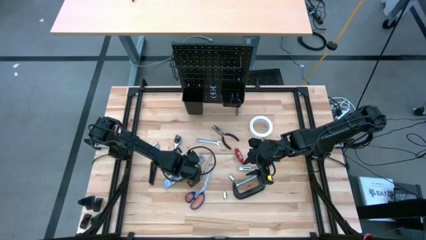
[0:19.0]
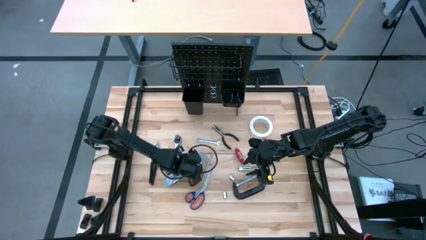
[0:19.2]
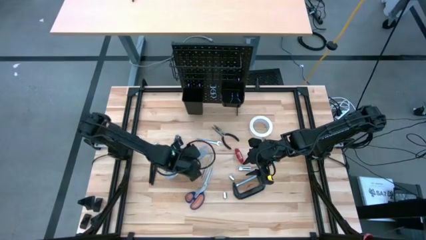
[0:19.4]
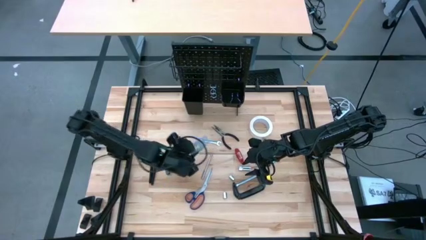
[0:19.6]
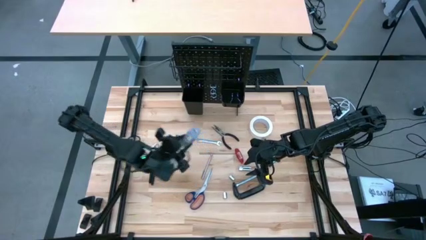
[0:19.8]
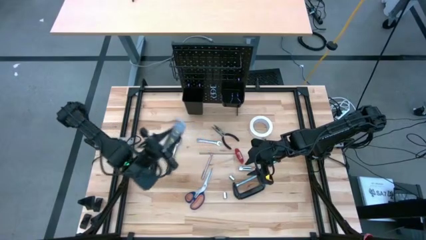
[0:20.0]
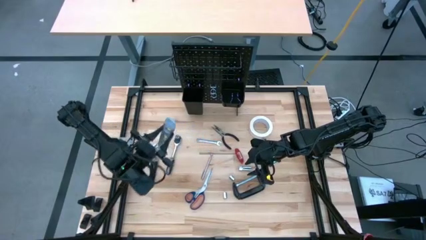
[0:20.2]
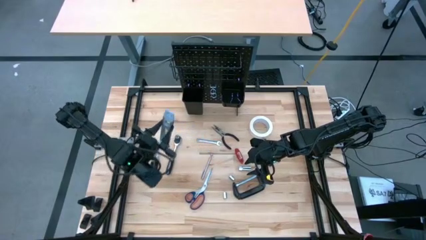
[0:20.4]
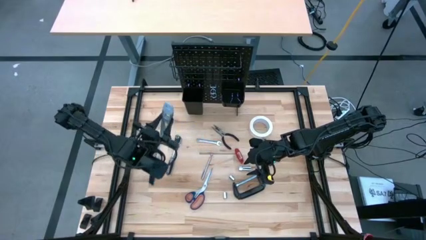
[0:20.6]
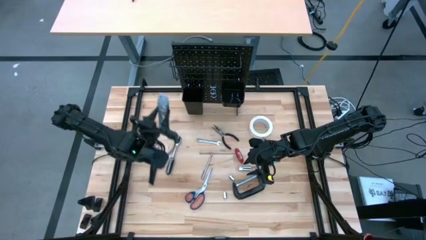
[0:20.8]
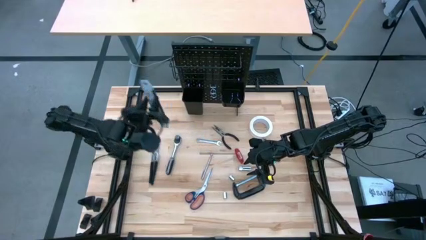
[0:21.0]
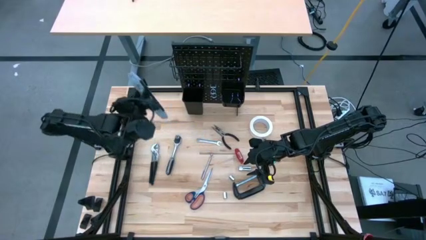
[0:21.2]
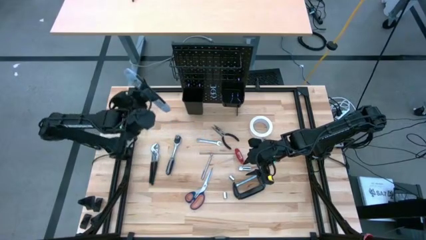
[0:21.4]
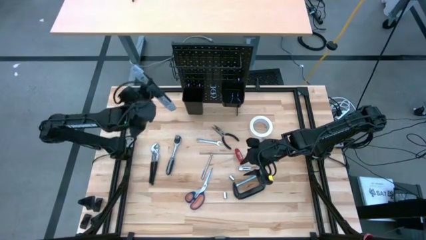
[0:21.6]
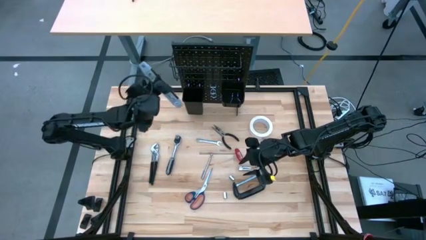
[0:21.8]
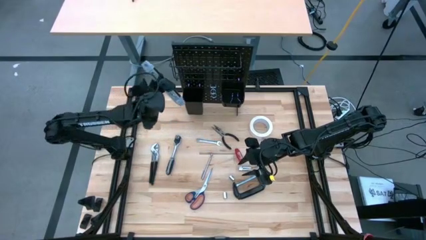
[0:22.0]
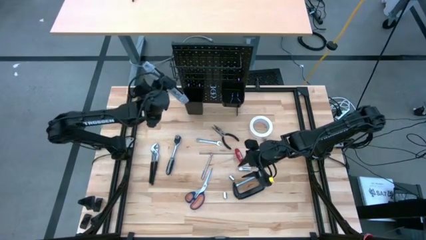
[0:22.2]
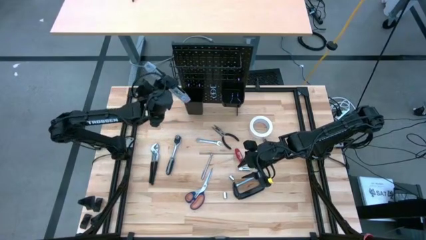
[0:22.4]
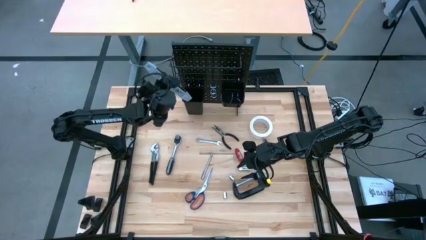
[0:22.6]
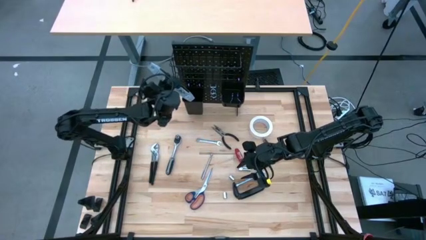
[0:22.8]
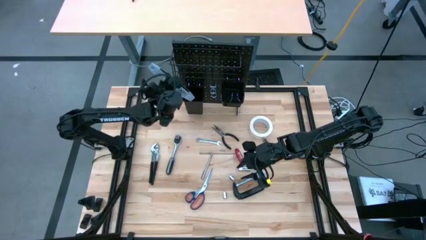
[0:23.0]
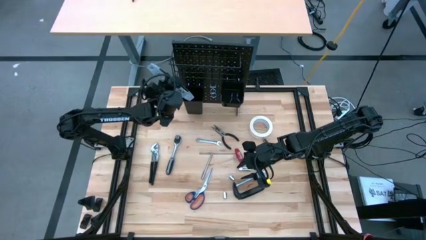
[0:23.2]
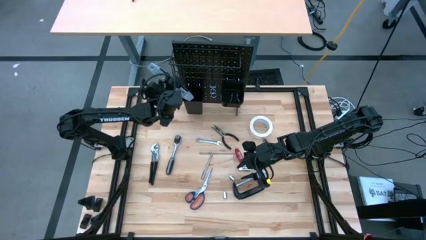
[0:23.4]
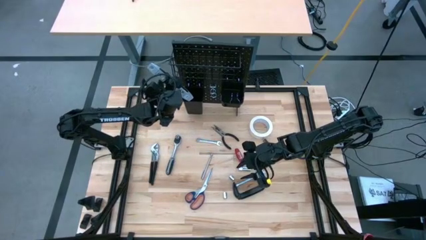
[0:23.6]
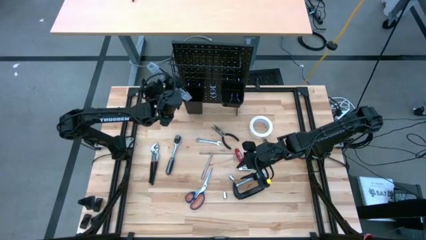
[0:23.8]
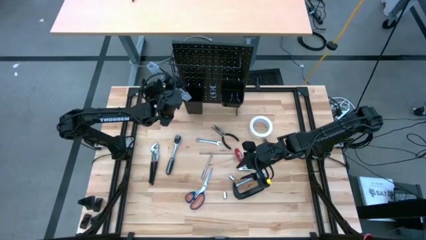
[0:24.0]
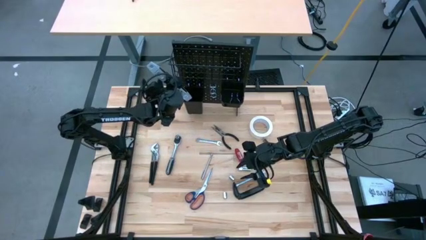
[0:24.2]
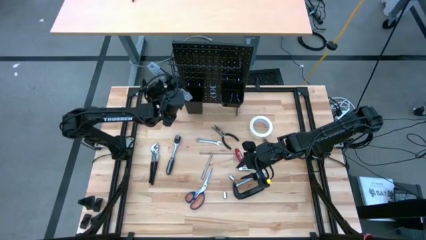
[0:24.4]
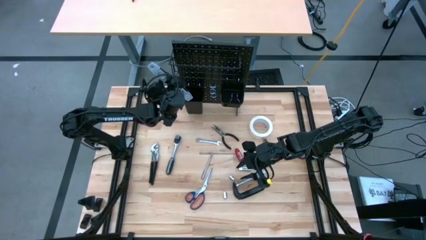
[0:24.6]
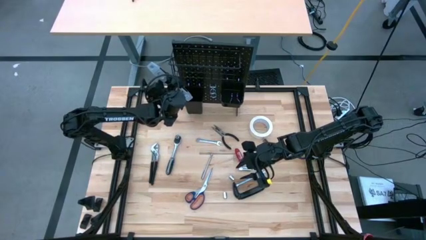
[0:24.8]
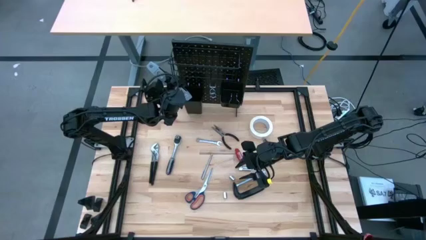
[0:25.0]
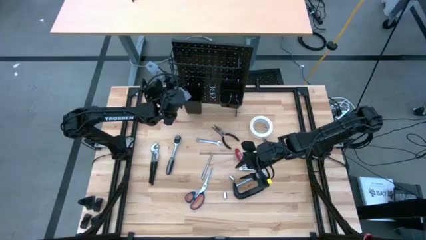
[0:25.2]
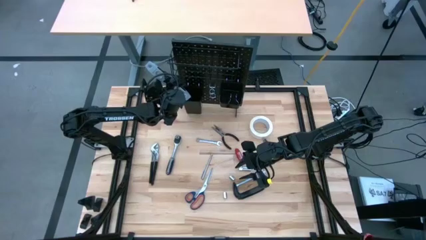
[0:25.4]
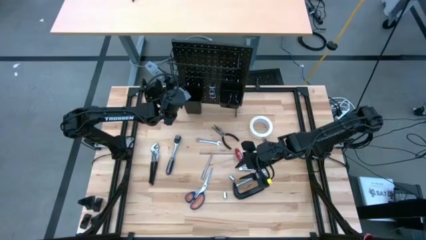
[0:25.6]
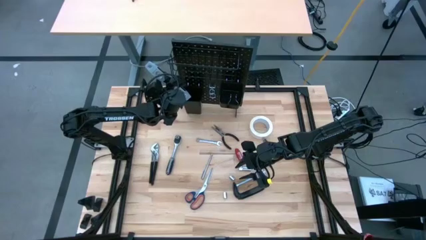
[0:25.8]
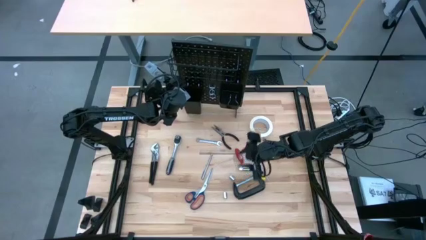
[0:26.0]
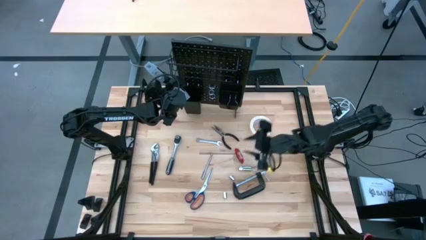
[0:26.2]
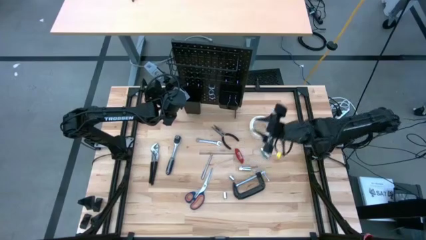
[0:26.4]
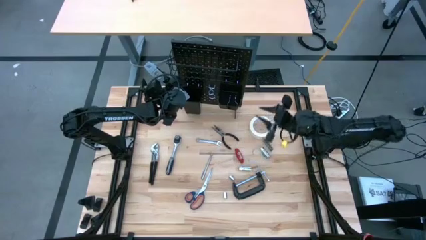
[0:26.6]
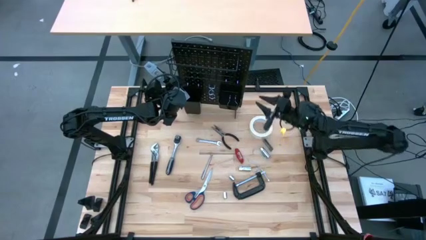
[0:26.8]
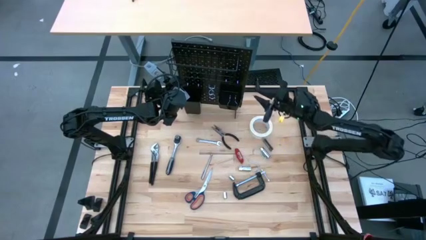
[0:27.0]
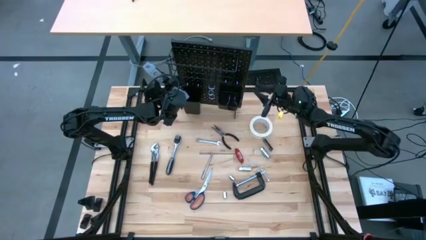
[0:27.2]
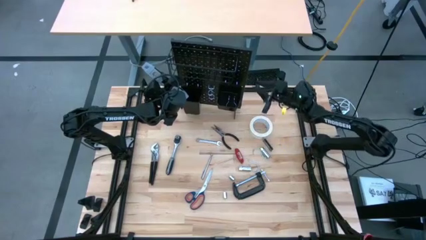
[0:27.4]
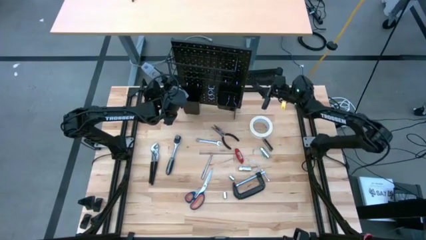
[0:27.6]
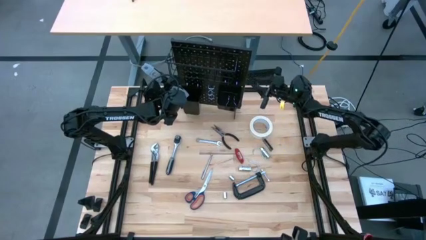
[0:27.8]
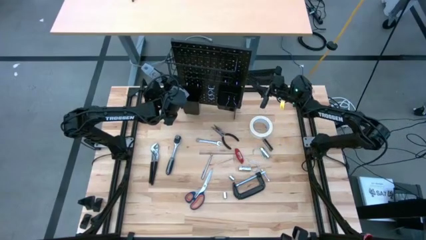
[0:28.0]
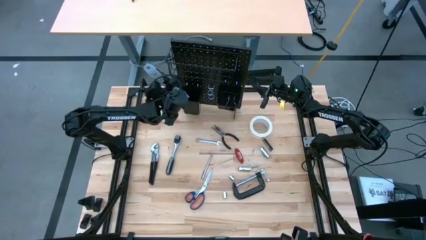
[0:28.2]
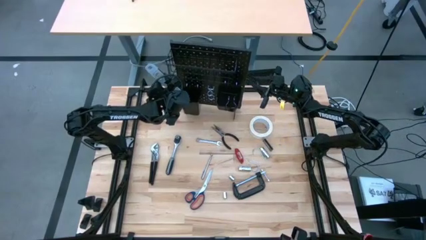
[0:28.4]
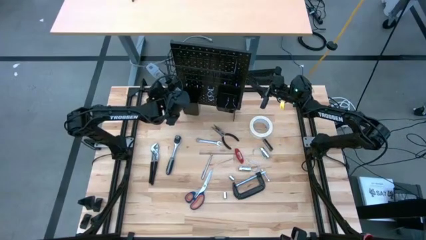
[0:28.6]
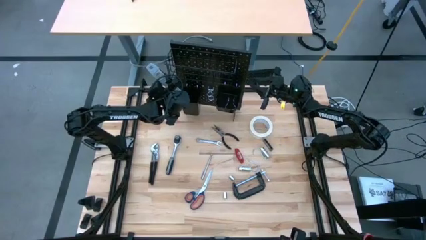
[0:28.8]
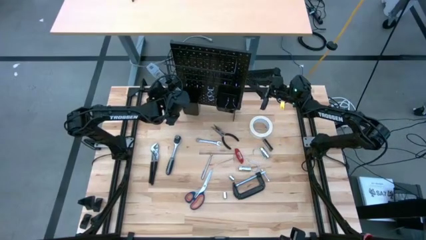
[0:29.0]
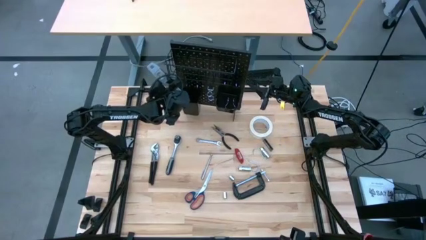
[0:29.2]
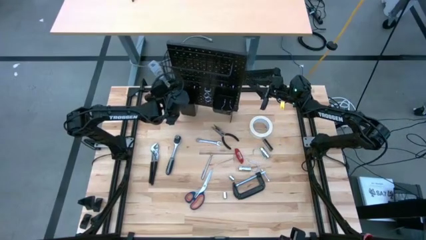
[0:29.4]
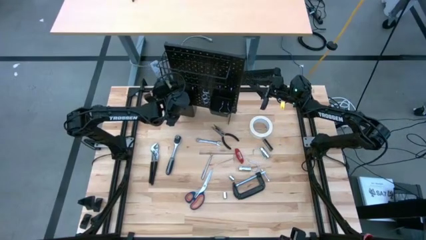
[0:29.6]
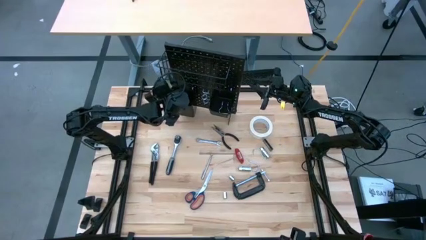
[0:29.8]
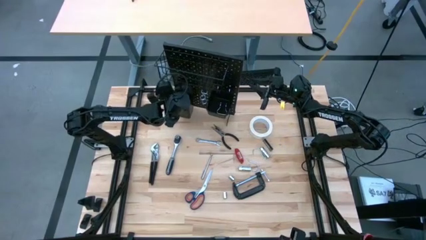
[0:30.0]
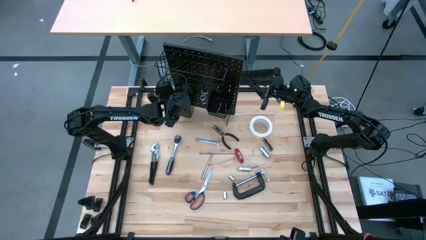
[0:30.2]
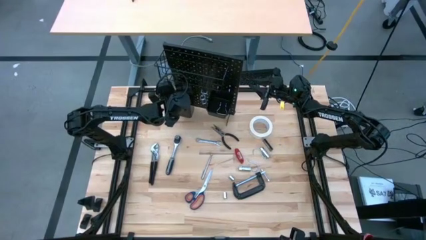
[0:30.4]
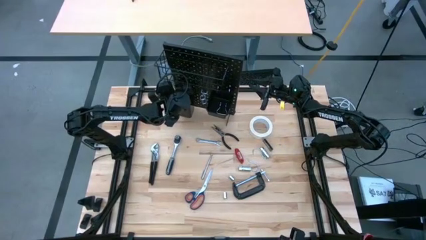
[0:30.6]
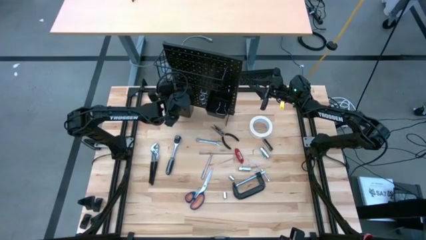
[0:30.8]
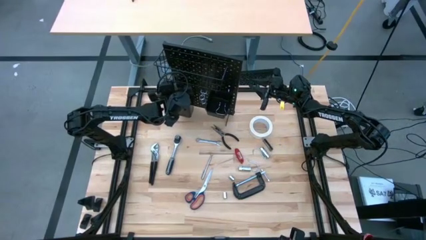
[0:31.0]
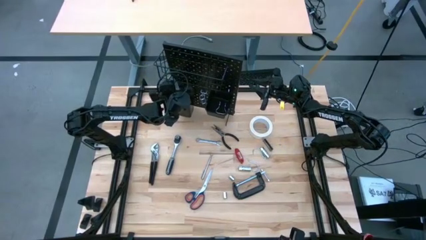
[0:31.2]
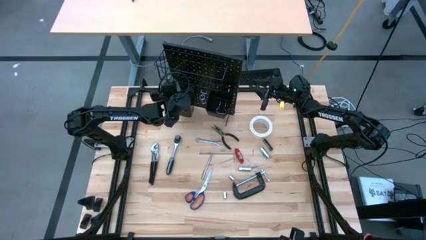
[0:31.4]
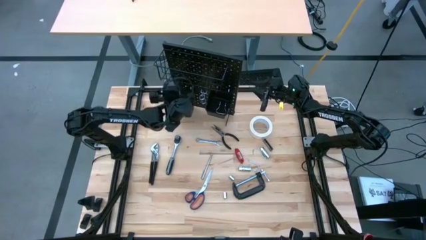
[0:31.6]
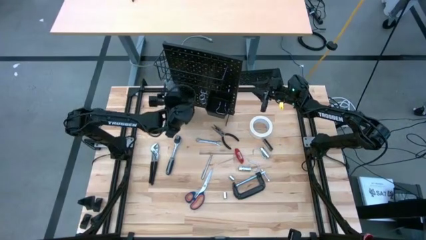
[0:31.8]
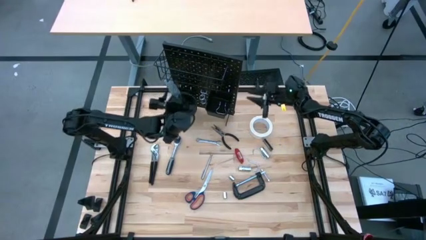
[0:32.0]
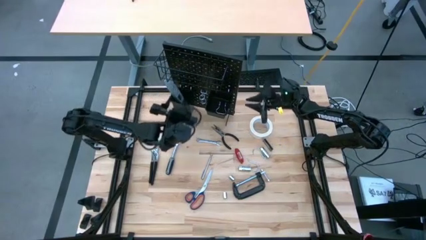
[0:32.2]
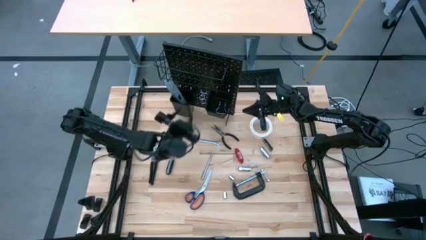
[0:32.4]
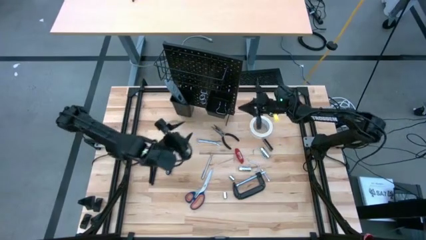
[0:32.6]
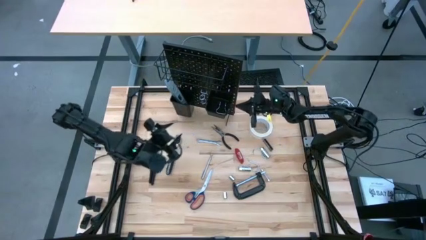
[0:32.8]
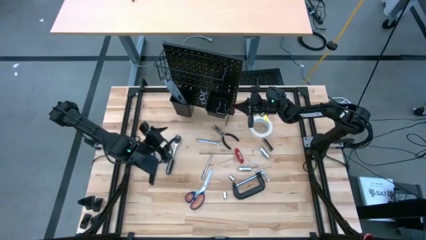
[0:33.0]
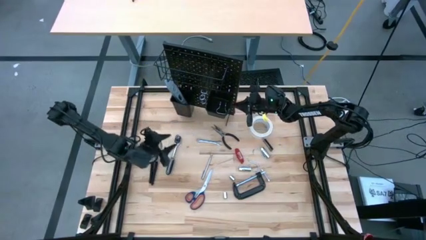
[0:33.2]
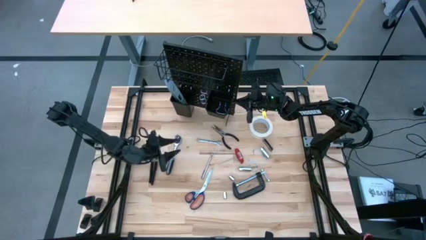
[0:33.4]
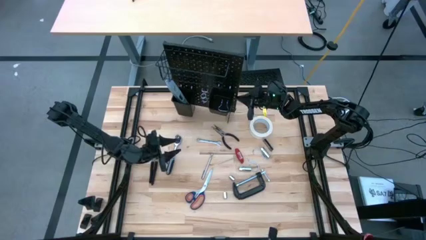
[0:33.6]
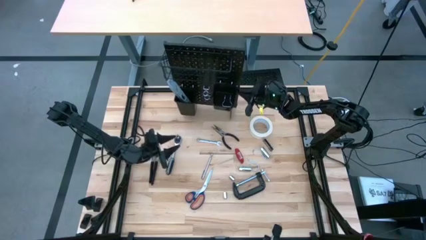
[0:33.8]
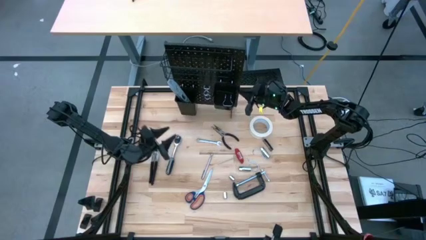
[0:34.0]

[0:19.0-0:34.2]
Task: Hang tools onto peg board
Put the gray spirit level into the left black bin on the peg board
